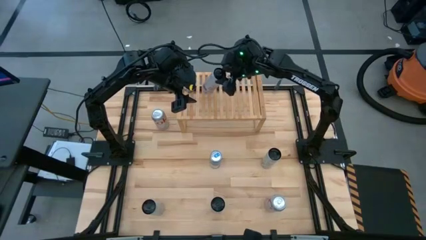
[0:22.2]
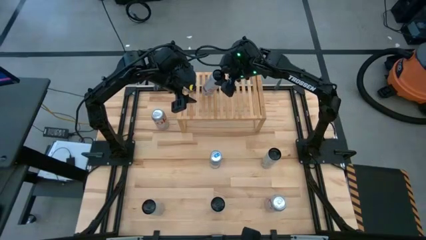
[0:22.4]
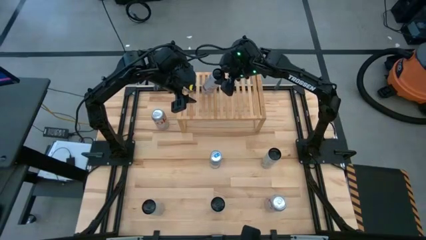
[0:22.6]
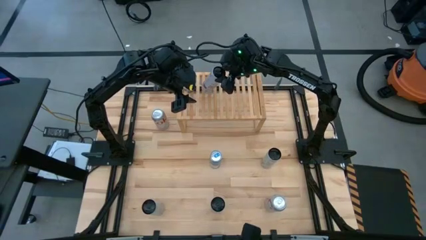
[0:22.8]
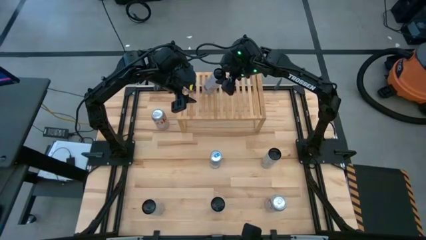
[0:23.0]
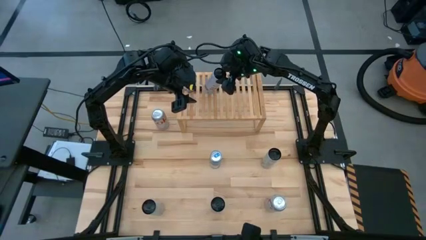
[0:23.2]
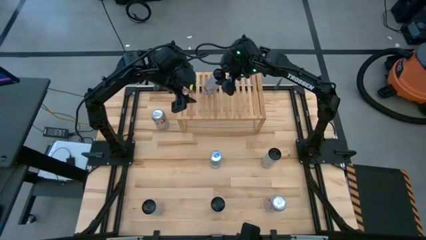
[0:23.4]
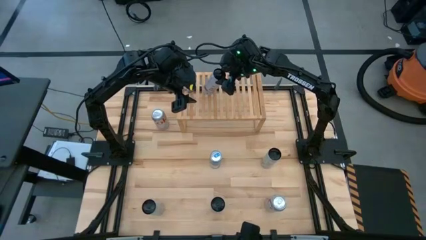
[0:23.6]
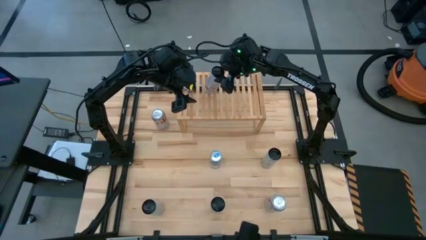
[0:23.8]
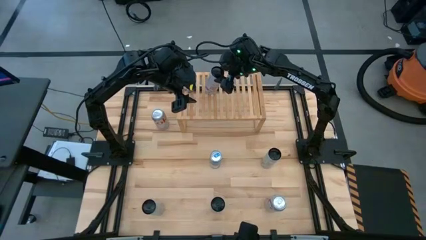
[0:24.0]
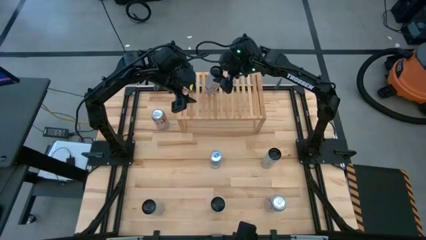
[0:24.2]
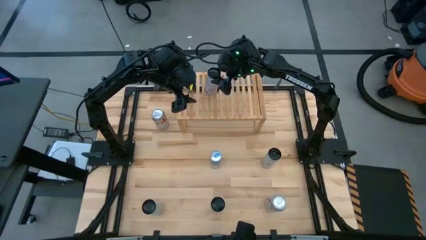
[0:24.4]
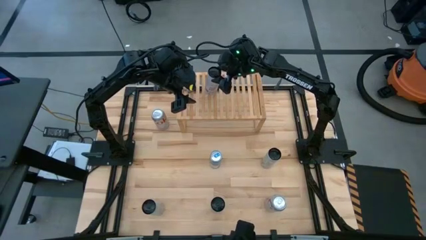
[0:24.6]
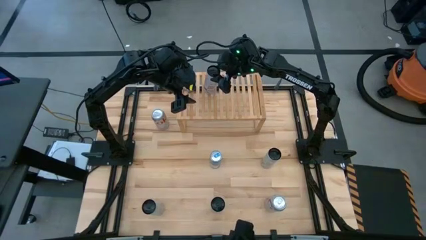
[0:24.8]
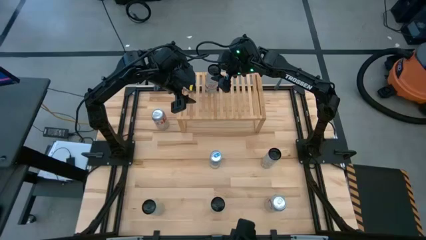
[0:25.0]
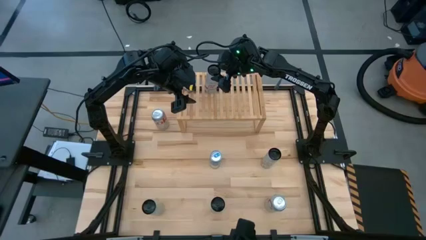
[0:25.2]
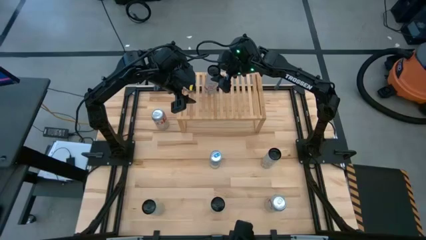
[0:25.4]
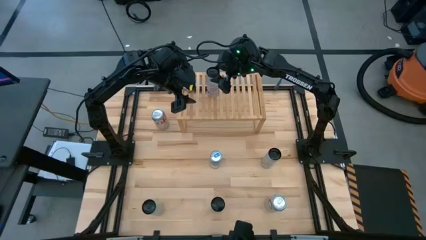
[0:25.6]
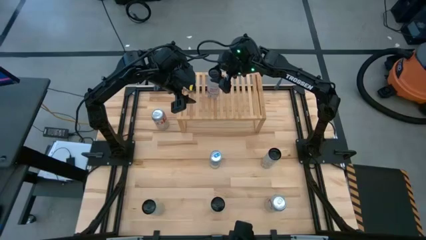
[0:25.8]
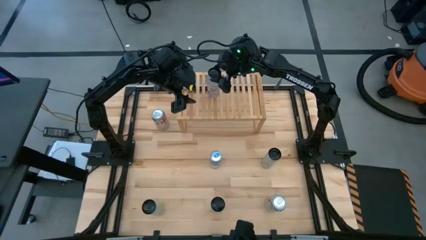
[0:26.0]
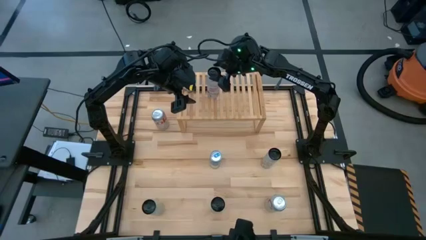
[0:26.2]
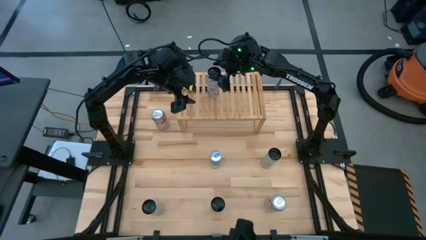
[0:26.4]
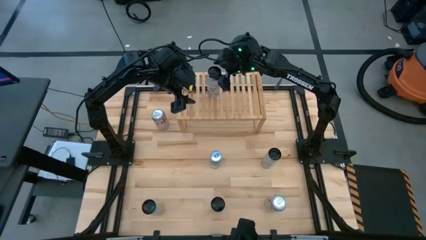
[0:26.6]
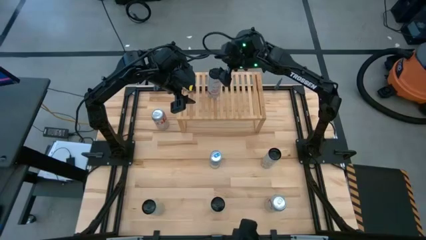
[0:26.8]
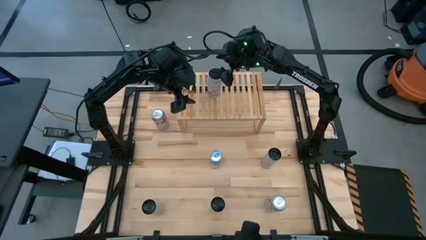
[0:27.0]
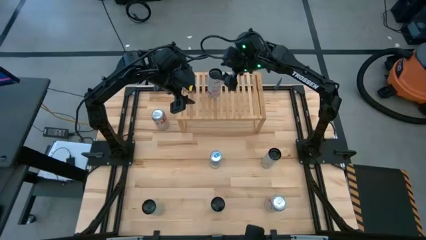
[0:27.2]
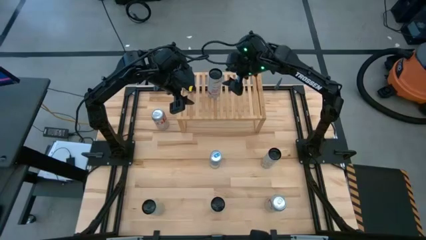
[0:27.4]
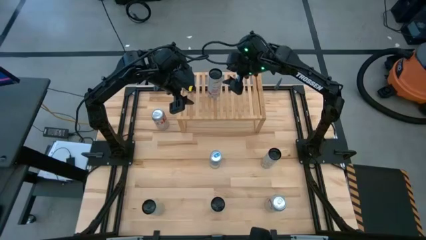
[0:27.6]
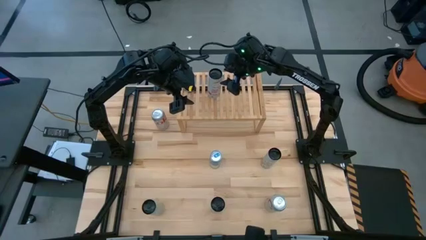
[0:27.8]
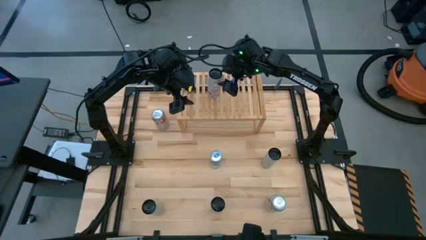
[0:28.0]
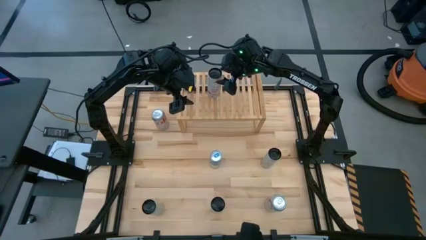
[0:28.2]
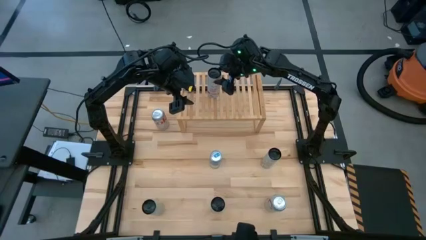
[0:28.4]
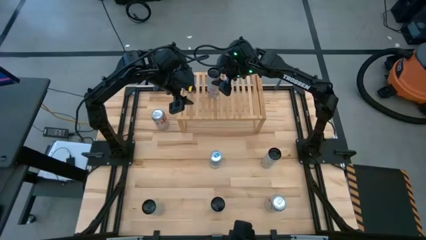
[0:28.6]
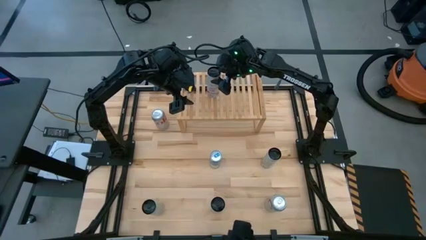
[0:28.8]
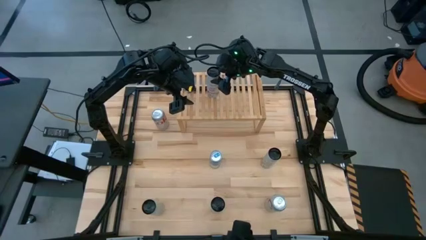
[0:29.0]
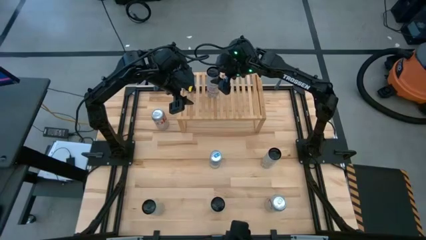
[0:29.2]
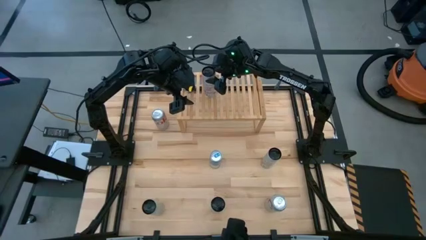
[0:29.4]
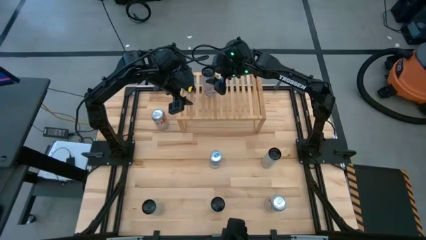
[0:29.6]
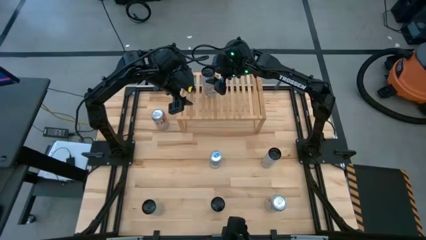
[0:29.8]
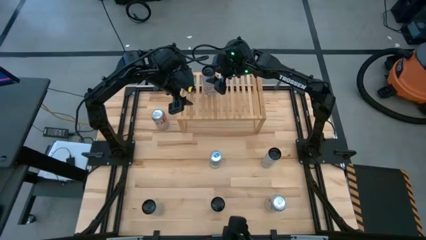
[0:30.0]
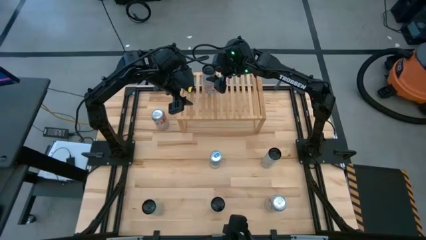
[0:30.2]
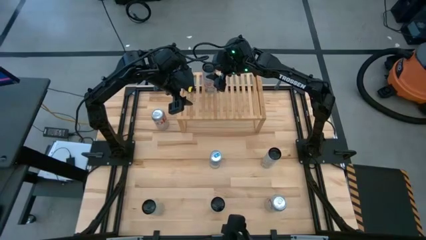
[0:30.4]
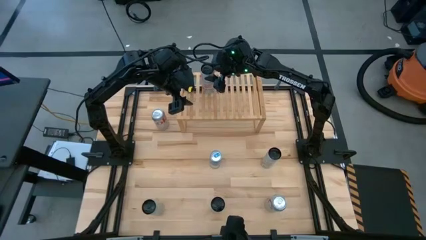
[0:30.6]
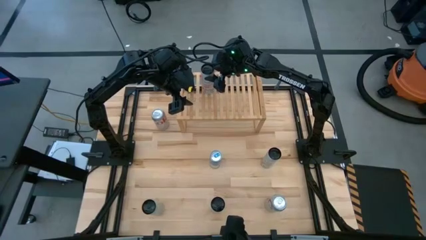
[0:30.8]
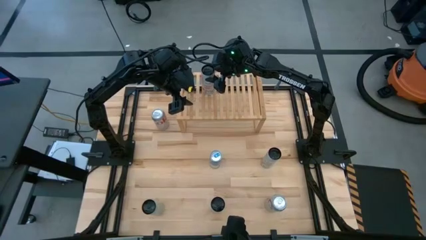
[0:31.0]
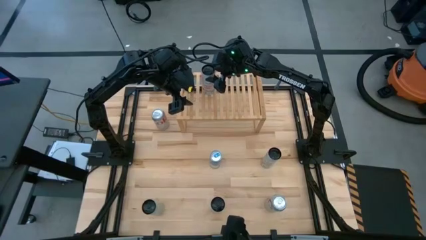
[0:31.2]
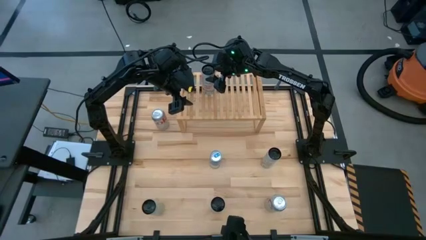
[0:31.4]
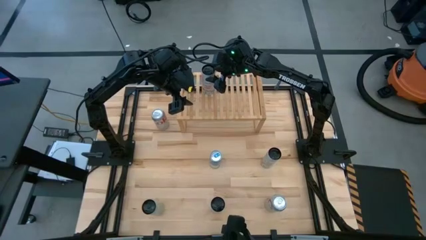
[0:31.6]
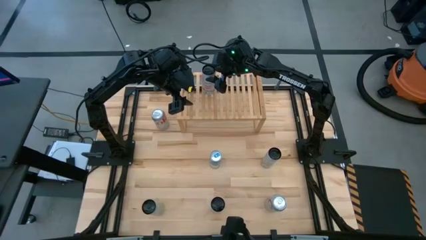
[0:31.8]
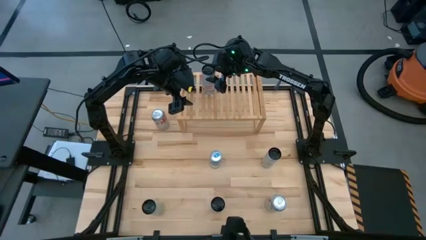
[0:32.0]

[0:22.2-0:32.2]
Task: Place canned beverage on shelf
Put the top white and pink soda can on the shelf

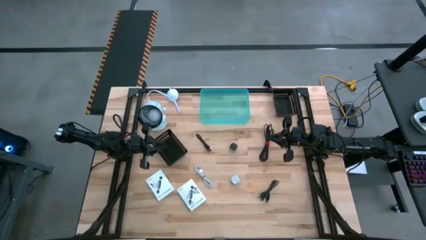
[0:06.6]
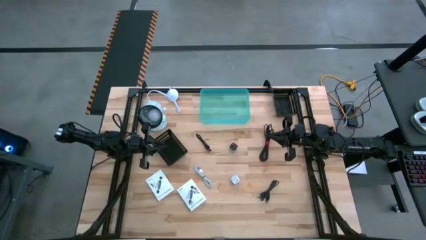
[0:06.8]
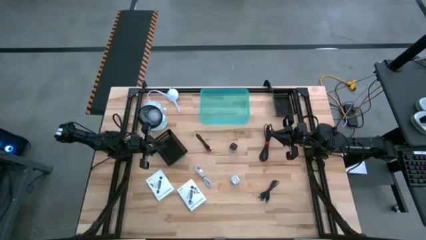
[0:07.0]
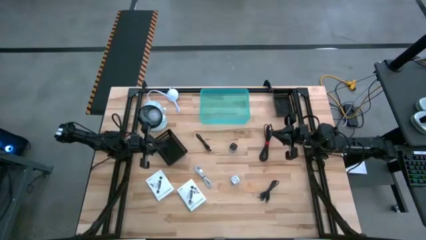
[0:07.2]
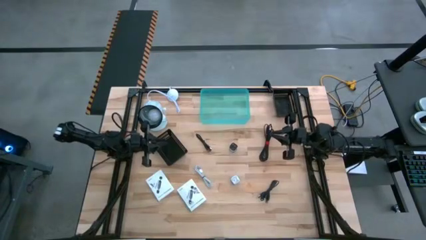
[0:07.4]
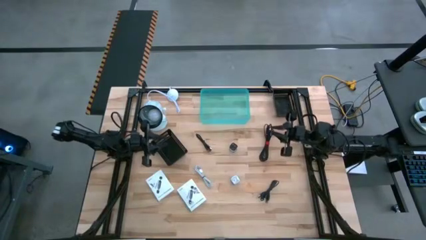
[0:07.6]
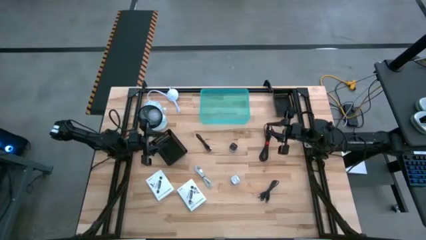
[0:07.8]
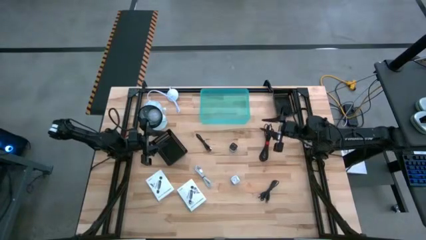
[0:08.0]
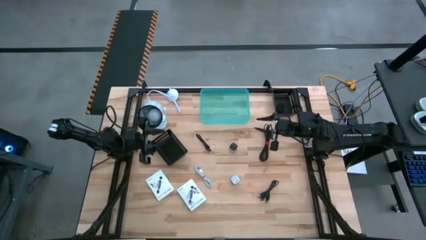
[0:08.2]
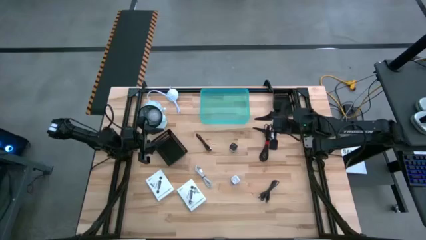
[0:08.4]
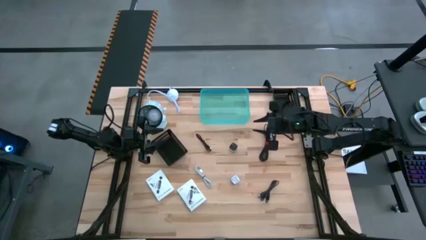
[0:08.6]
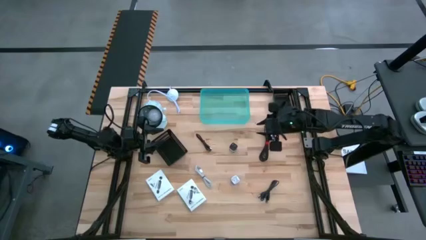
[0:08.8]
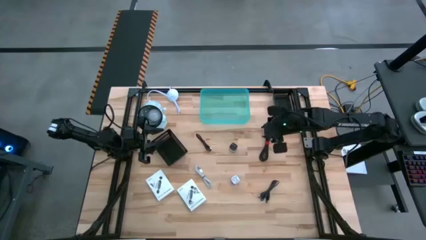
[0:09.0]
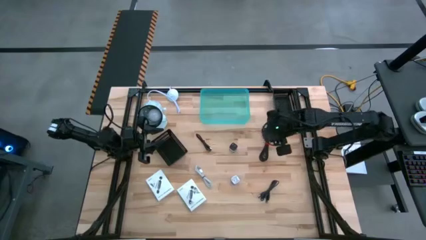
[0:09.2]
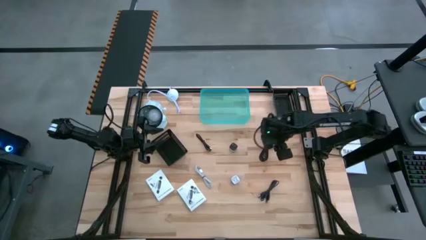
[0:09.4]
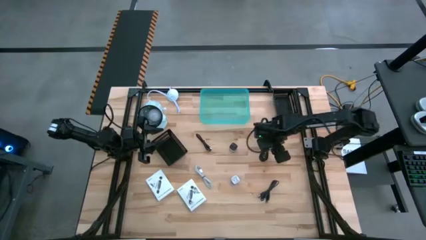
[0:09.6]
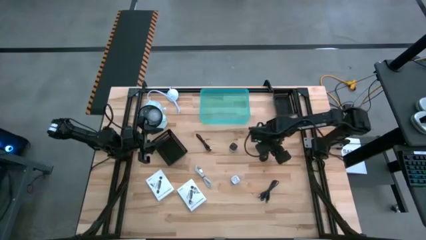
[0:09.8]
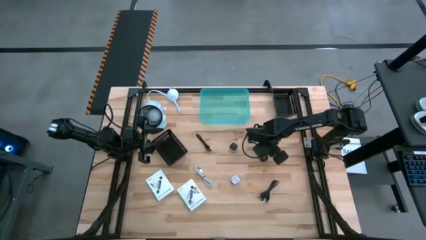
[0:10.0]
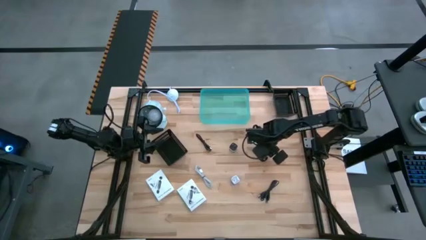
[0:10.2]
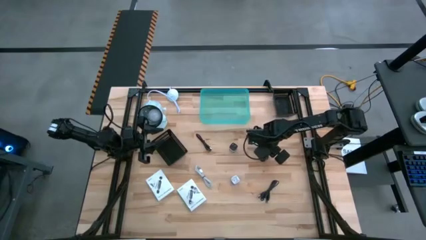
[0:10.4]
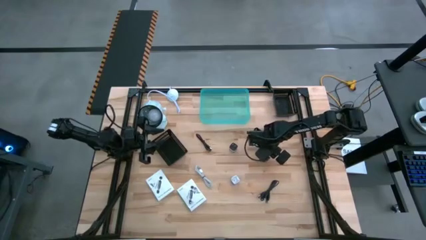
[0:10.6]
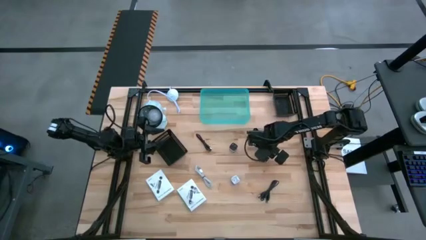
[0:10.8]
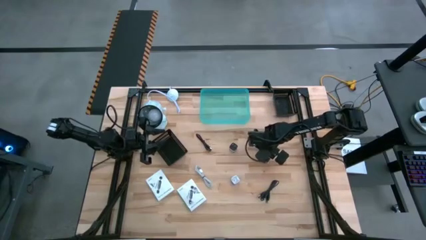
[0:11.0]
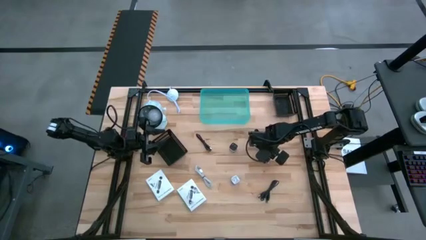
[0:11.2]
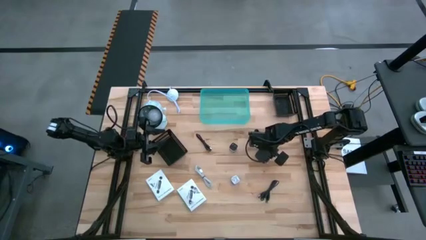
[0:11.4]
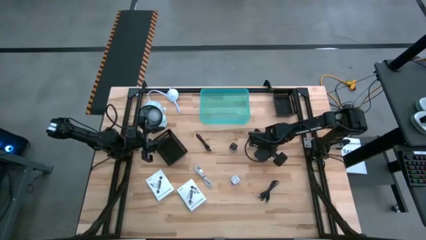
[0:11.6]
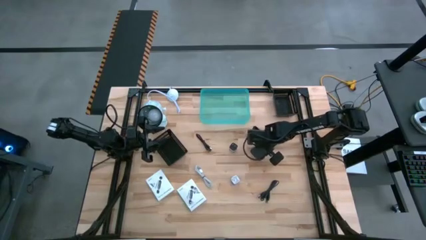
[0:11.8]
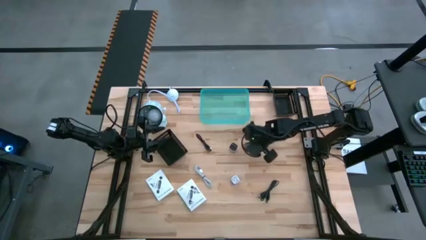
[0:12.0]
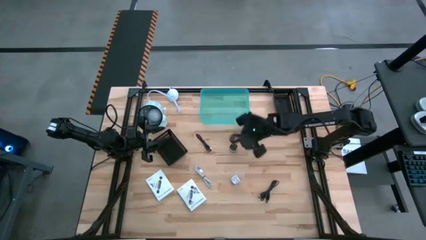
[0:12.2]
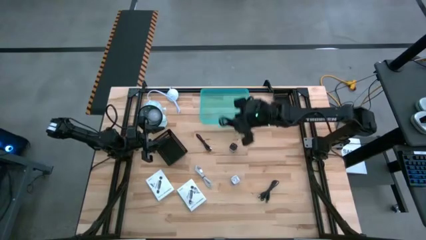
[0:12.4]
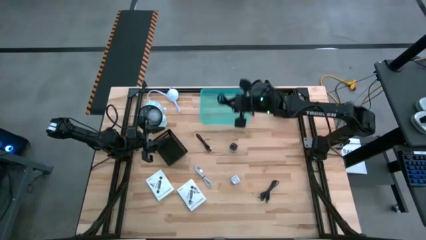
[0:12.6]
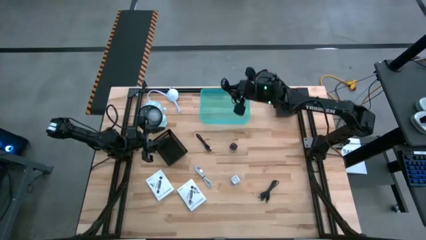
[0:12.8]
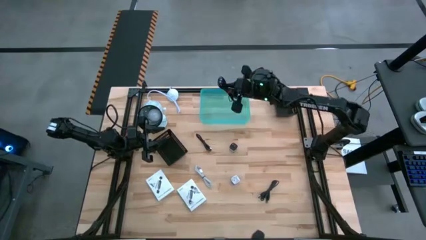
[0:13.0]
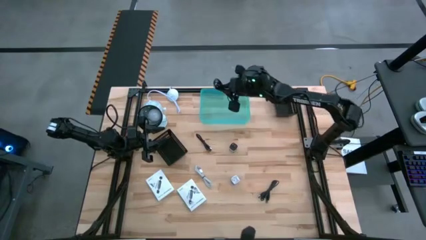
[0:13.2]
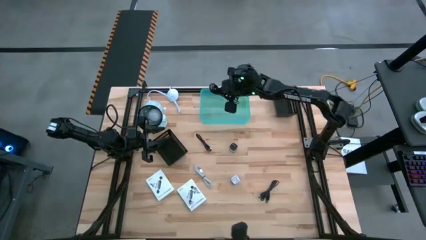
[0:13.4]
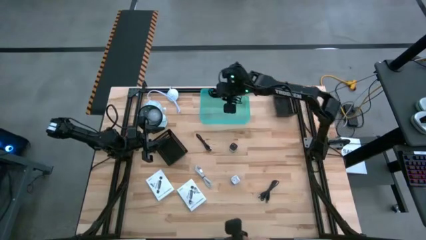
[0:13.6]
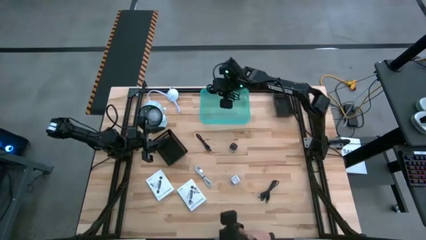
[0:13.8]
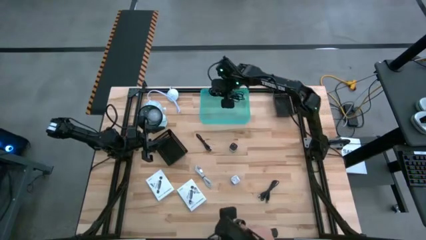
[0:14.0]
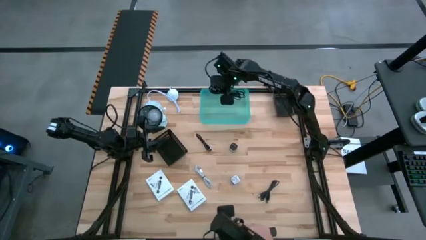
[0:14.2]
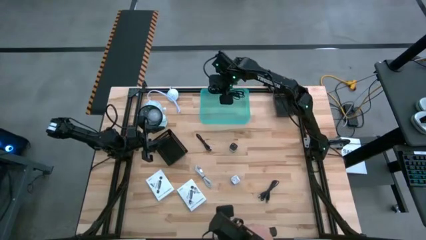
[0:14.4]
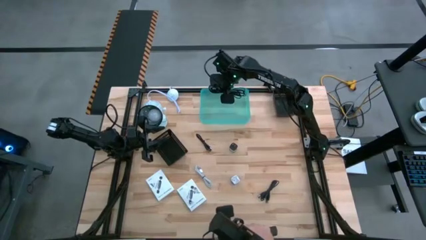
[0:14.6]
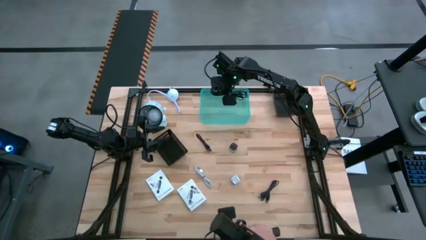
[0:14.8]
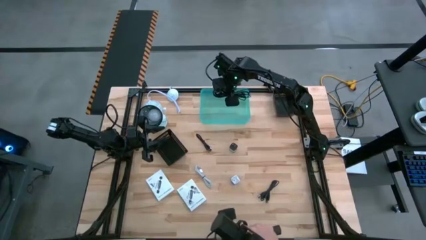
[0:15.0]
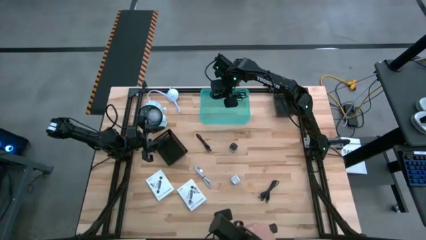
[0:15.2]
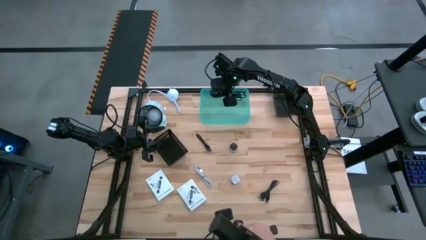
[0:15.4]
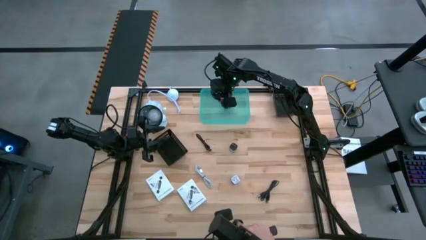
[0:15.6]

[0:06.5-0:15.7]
Task: Pick and place items into bin
Put the top right black charger cable into the green bin
